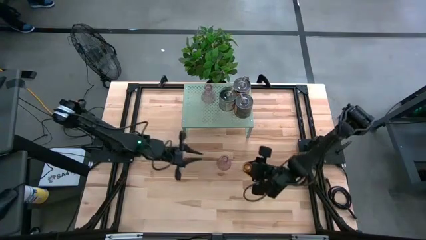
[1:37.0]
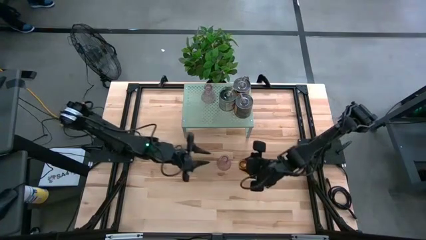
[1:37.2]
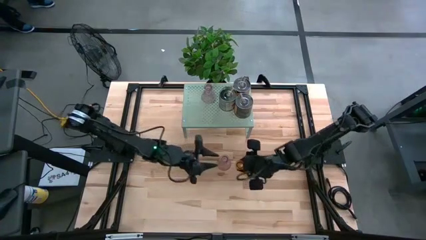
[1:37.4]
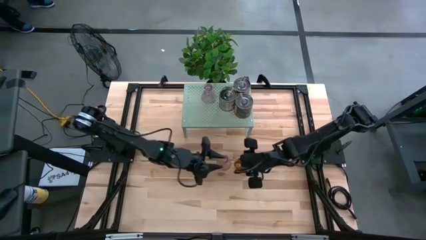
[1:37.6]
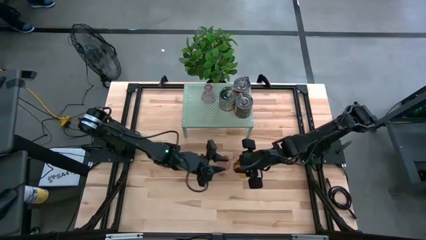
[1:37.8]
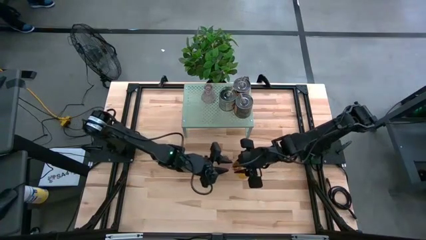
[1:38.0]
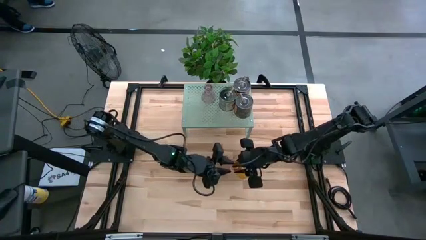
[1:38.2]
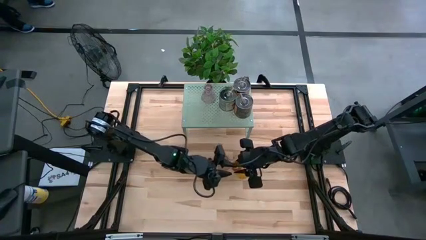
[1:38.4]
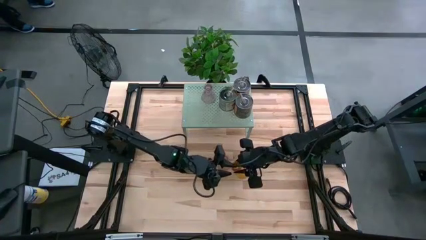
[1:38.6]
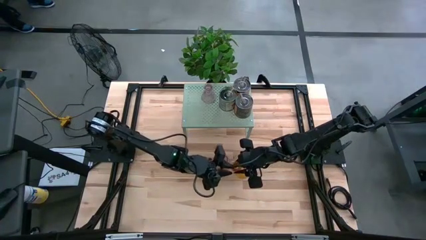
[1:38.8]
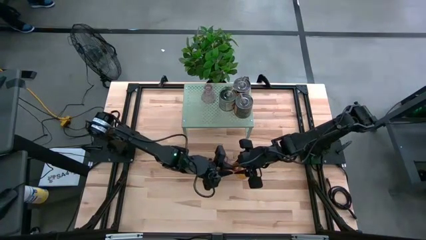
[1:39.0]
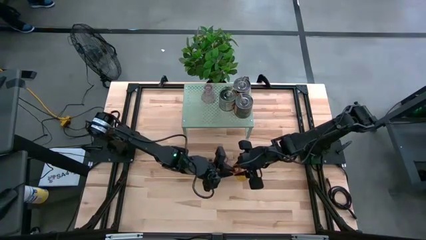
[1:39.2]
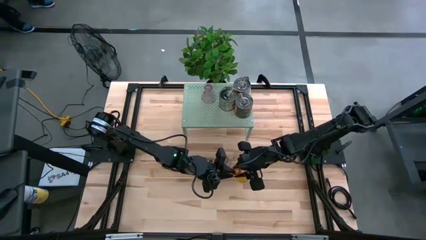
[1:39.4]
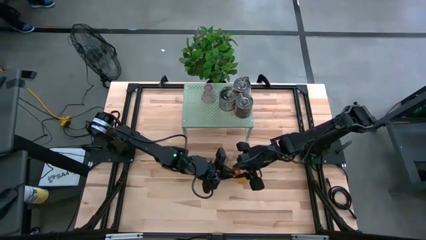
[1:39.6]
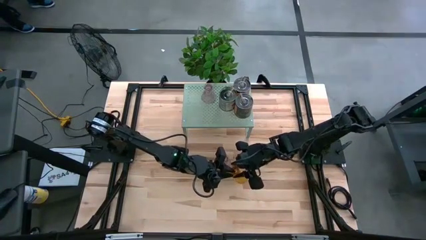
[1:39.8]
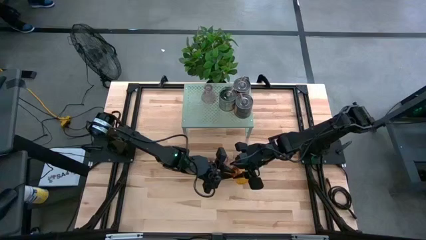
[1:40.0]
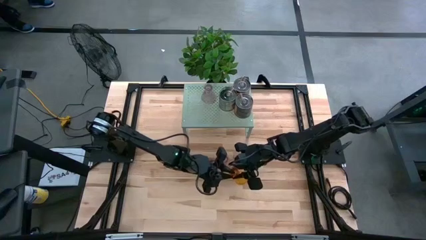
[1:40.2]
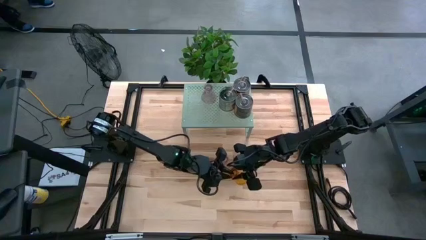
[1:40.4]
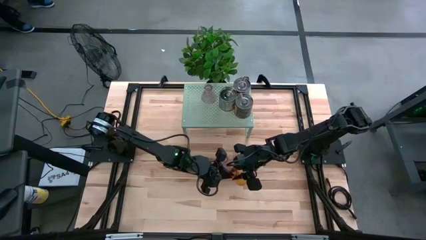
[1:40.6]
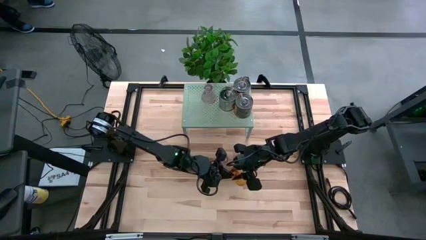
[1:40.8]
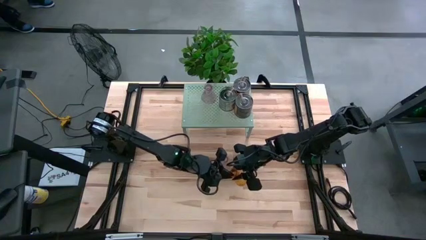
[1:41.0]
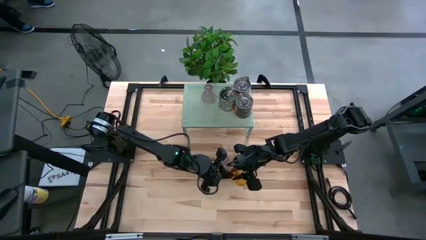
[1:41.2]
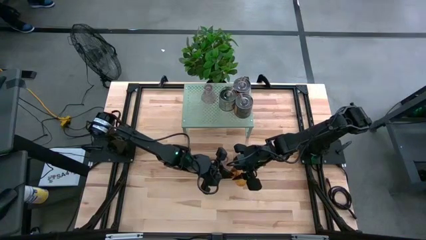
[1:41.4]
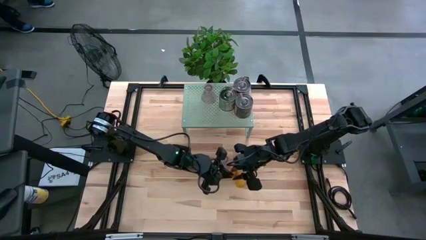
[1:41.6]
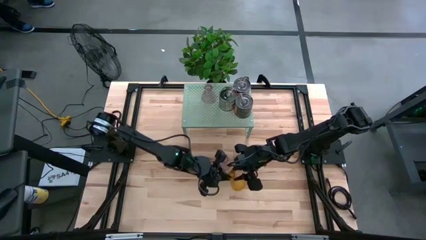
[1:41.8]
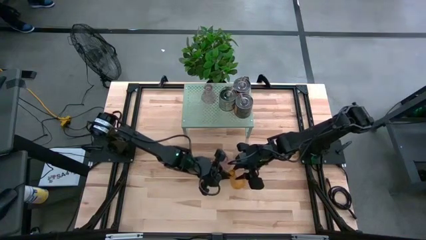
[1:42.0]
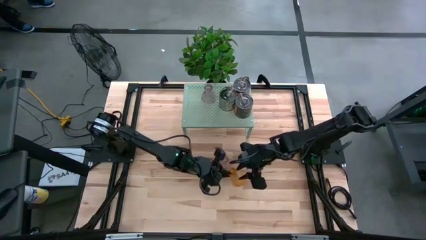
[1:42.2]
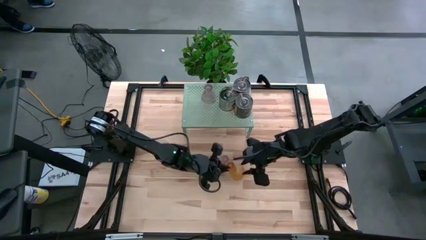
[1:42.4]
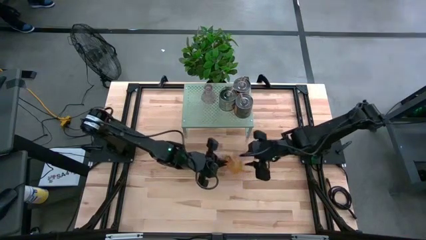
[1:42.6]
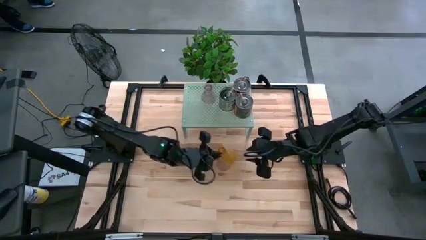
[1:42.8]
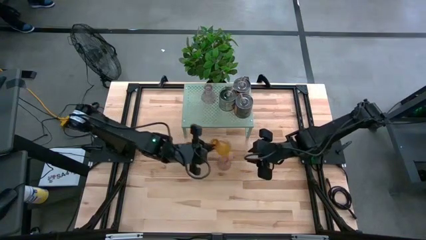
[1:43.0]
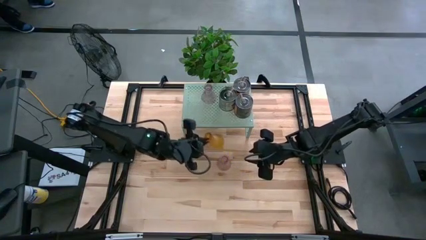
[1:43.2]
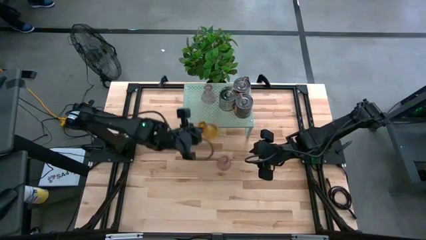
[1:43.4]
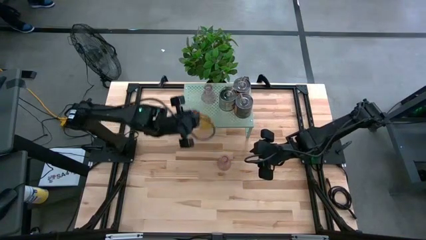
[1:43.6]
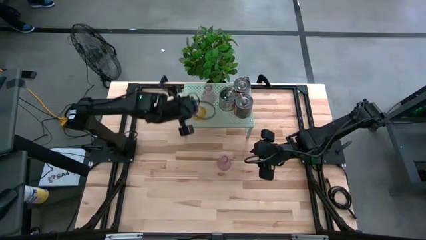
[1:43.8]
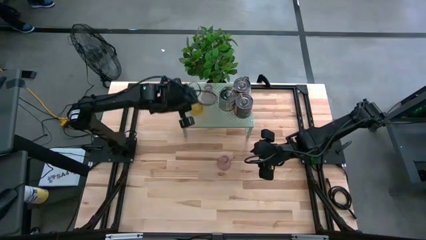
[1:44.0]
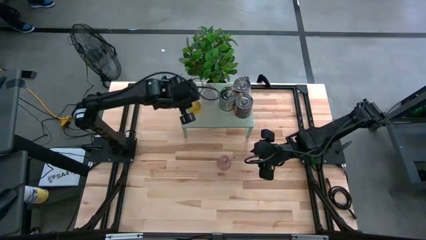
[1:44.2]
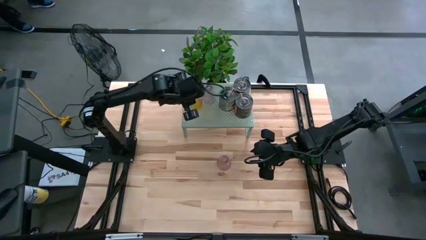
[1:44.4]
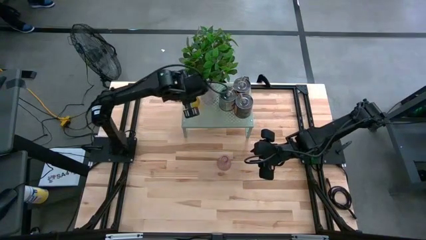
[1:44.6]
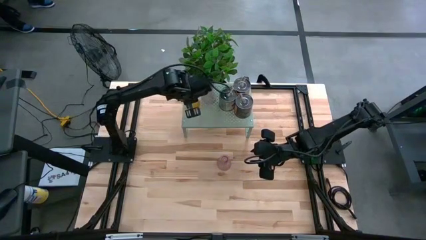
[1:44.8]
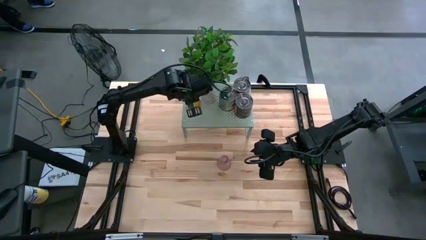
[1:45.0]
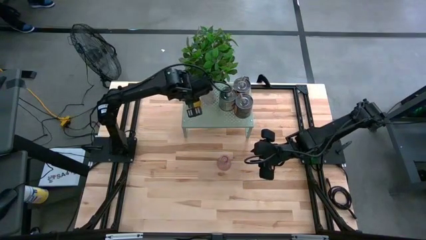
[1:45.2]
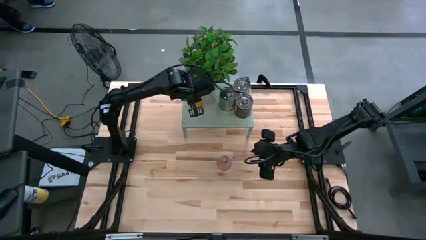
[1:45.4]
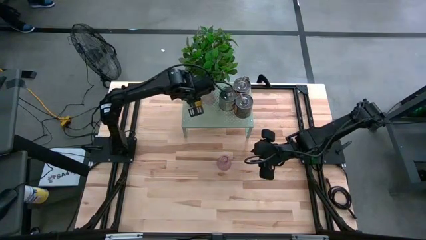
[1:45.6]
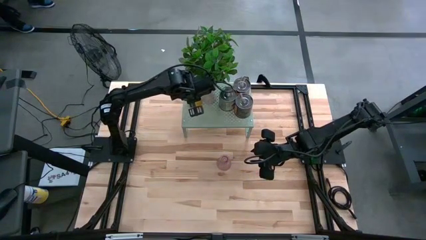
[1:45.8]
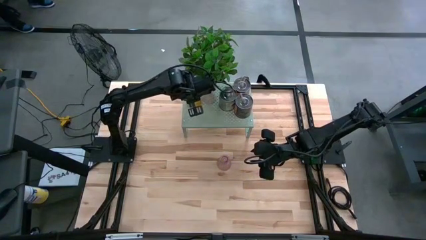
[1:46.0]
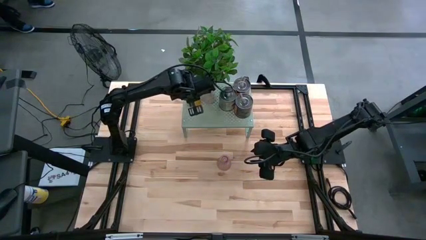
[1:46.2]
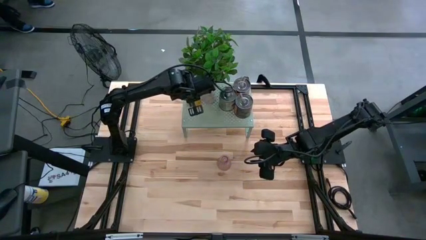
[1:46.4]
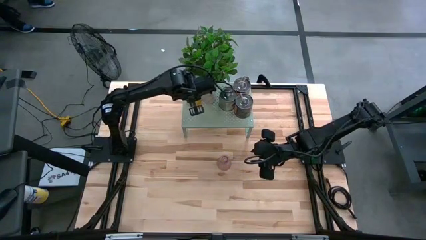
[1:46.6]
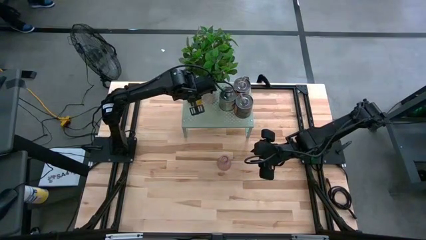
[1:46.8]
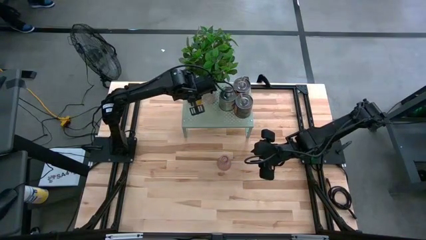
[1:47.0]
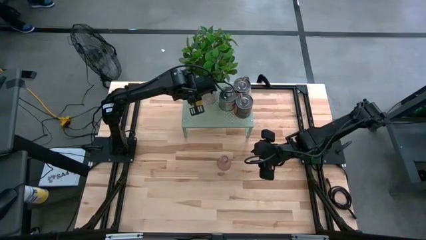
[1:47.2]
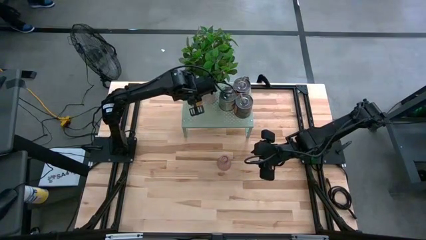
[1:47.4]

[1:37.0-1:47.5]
Task: Pick & Place candle stick holders
Put the yellow glass candle holder on the shelf

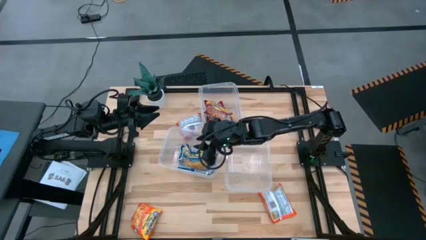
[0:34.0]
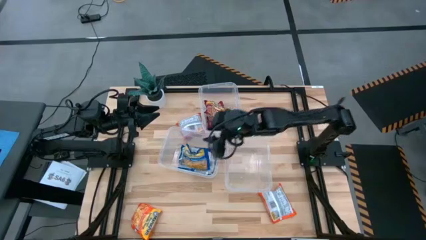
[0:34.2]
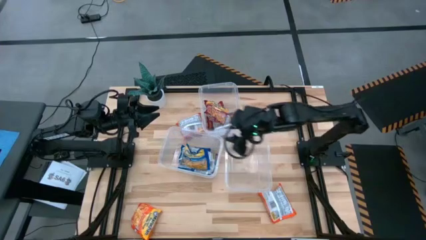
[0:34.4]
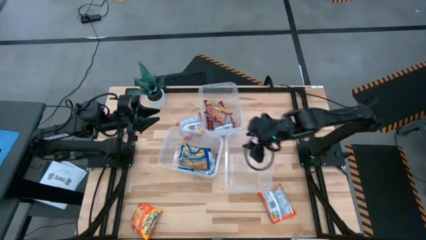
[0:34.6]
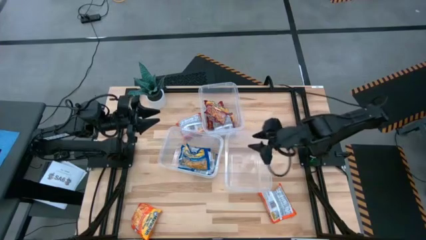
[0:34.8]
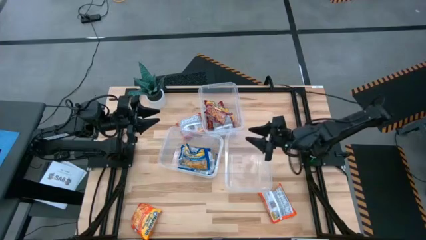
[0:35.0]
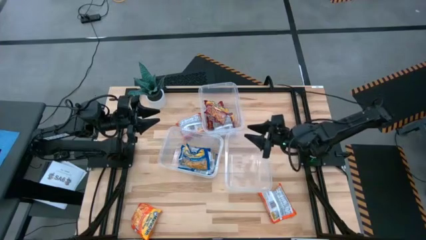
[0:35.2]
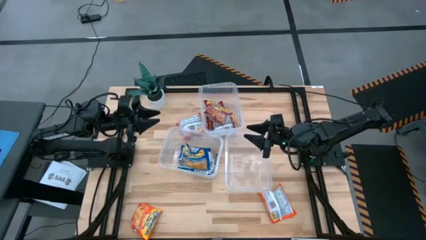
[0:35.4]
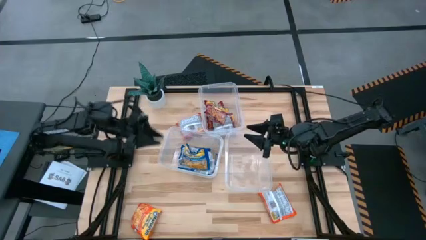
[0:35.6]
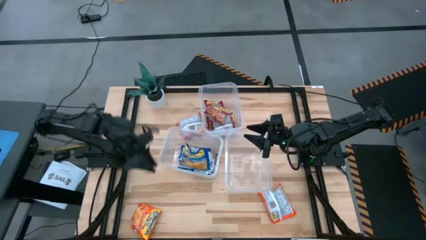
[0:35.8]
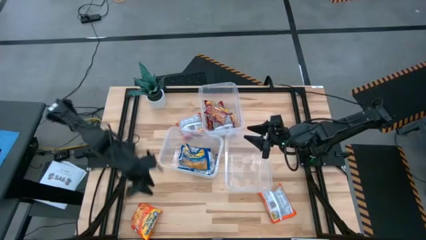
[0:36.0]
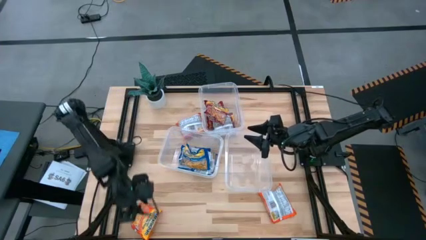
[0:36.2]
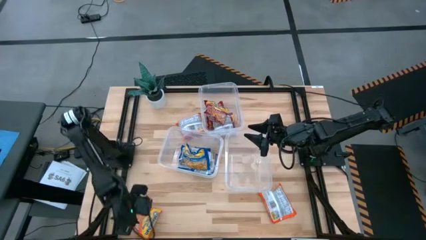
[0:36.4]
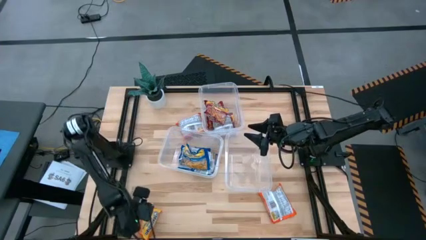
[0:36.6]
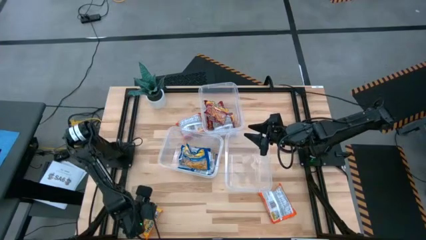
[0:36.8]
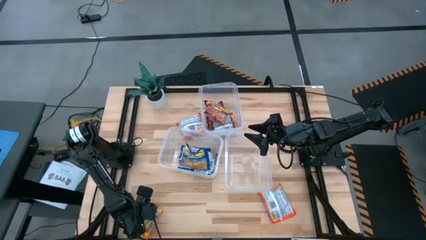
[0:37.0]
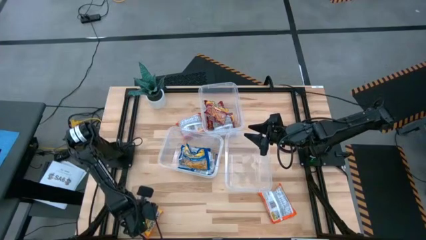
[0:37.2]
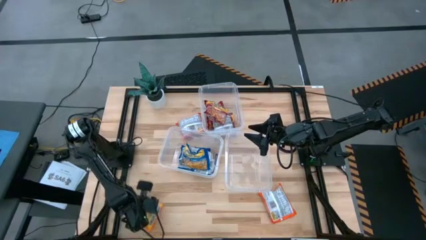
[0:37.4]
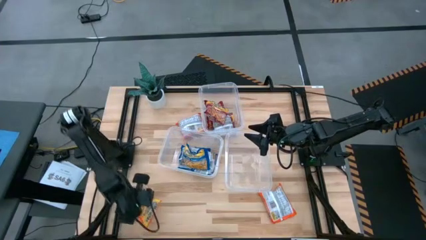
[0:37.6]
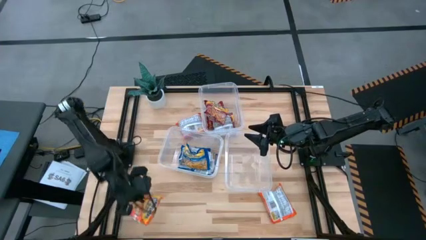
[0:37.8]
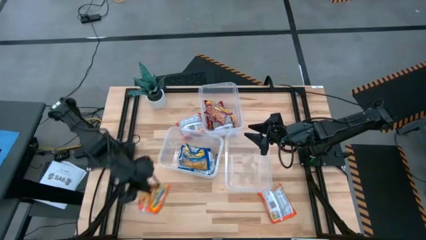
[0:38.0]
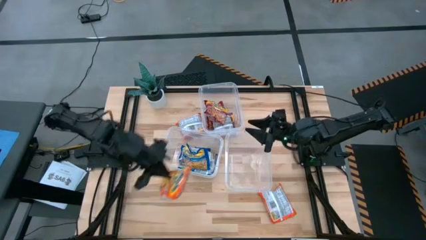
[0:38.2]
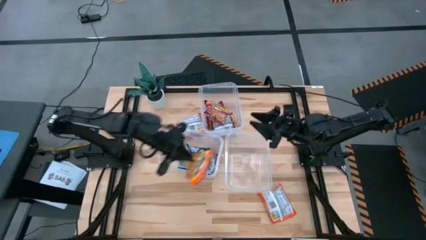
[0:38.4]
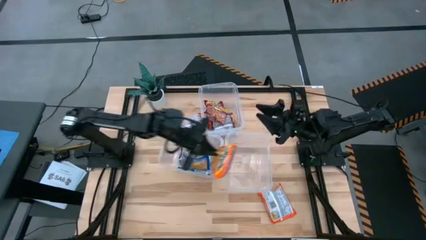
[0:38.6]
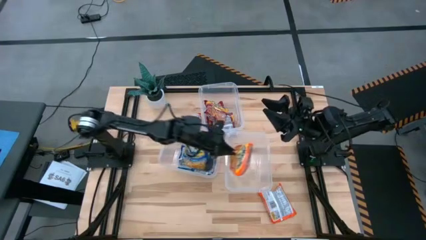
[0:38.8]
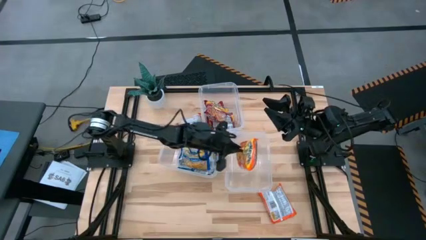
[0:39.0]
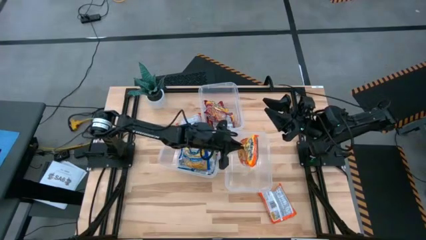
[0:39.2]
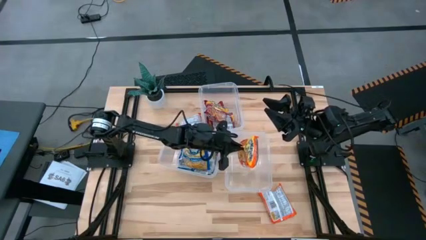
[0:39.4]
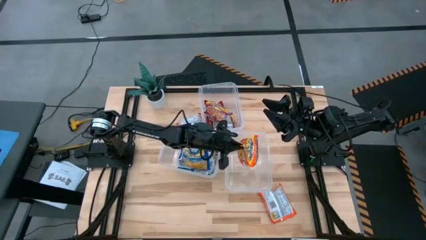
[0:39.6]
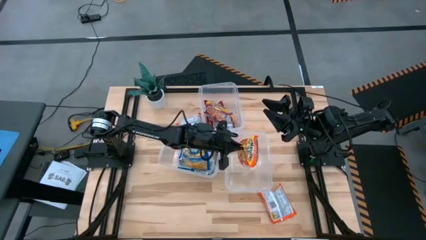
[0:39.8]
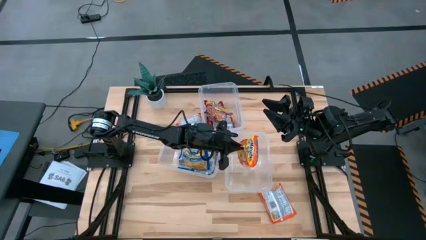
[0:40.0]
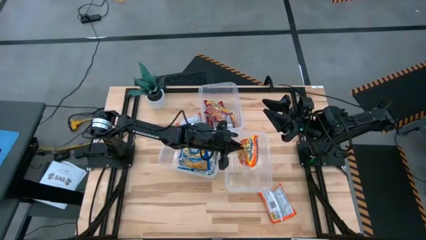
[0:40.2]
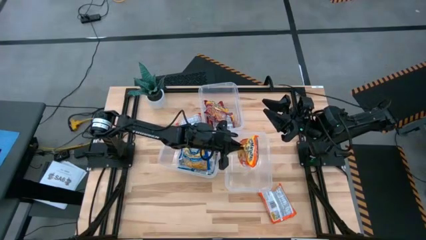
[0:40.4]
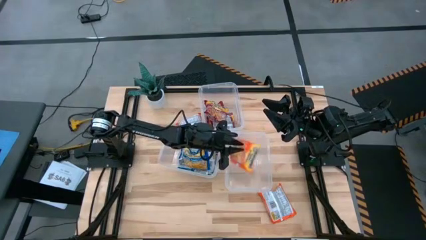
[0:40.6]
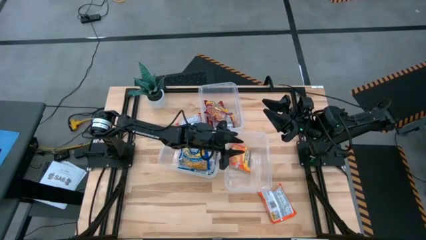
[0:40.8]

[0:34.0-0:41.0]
Task: Sort Maruchan noodles
Put the bottom left orange noodle pack into the bottom right transparent bin
